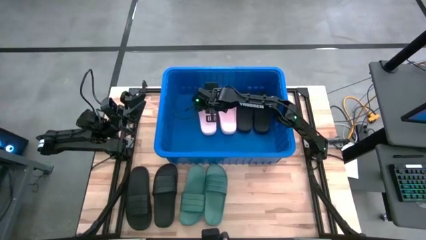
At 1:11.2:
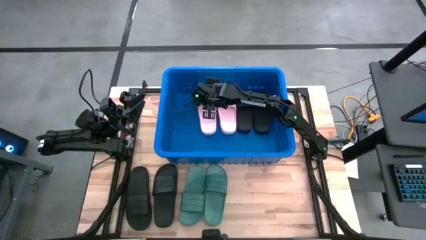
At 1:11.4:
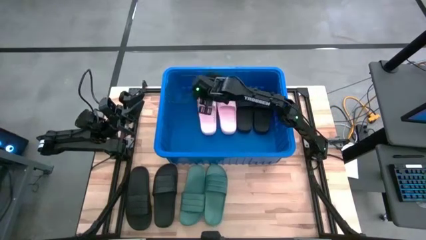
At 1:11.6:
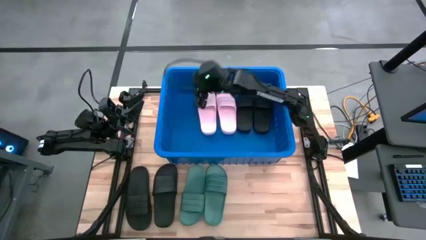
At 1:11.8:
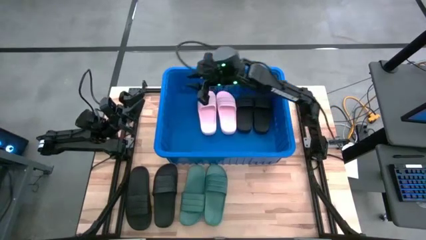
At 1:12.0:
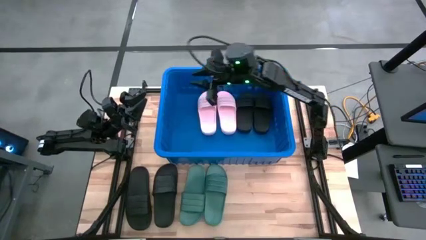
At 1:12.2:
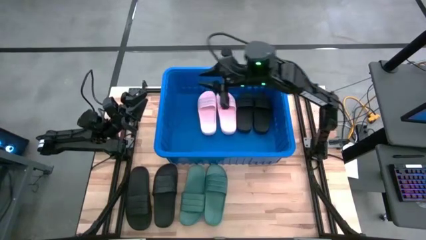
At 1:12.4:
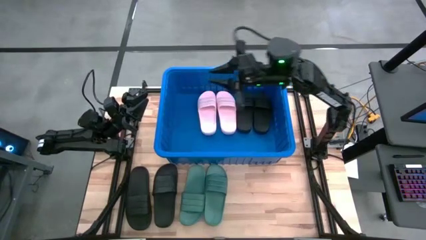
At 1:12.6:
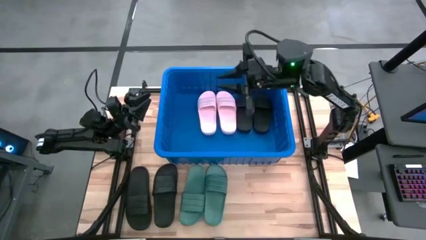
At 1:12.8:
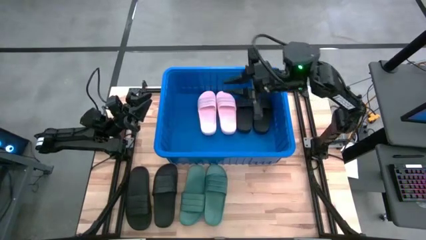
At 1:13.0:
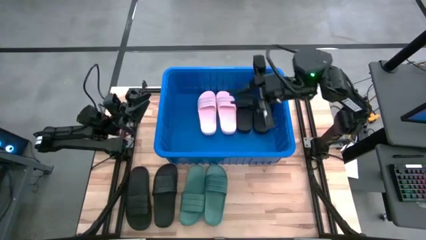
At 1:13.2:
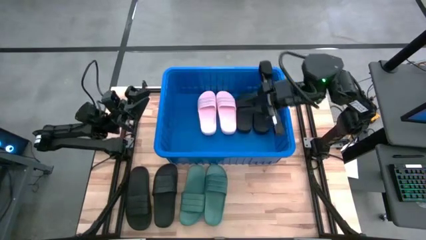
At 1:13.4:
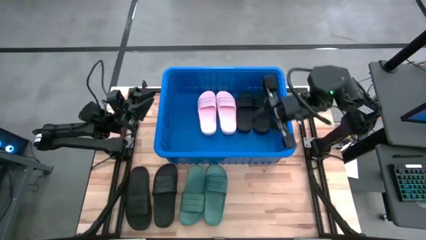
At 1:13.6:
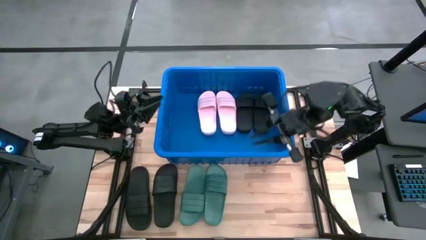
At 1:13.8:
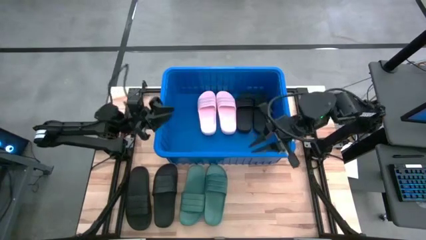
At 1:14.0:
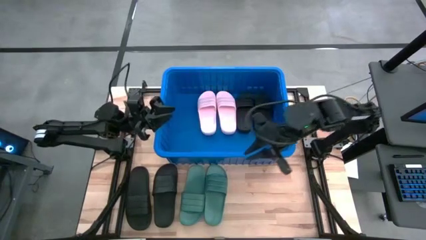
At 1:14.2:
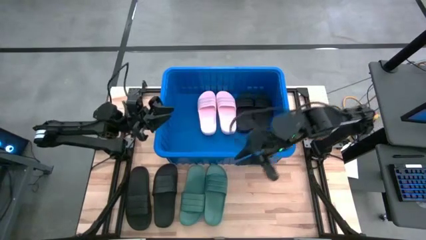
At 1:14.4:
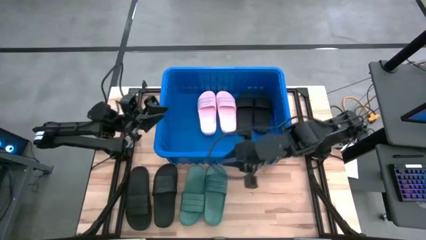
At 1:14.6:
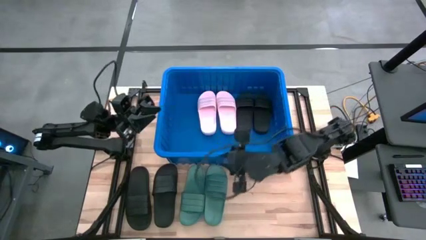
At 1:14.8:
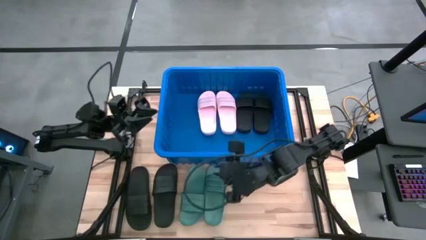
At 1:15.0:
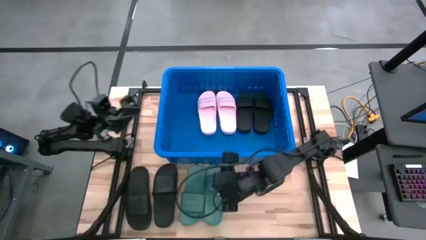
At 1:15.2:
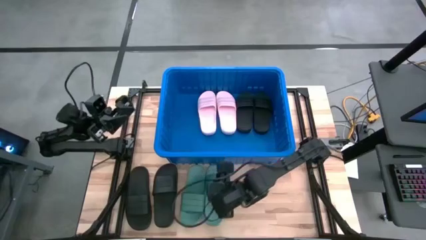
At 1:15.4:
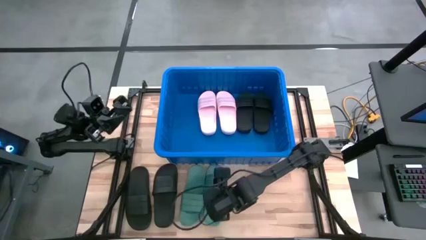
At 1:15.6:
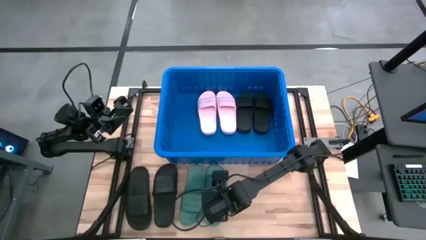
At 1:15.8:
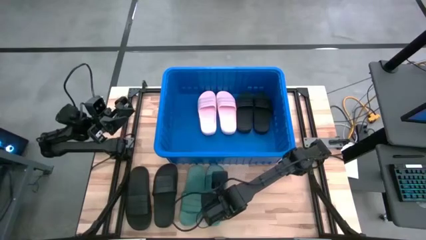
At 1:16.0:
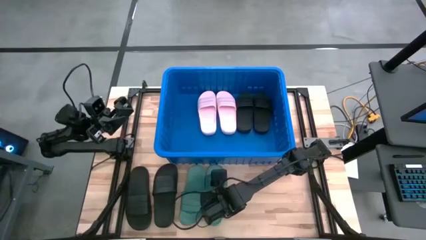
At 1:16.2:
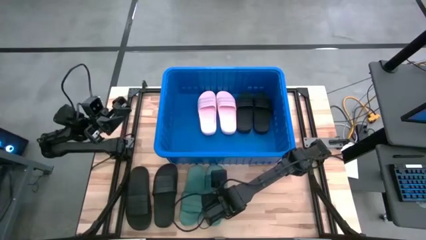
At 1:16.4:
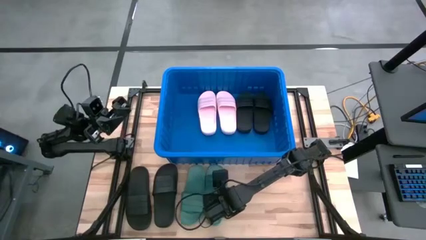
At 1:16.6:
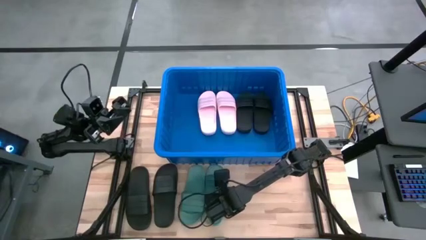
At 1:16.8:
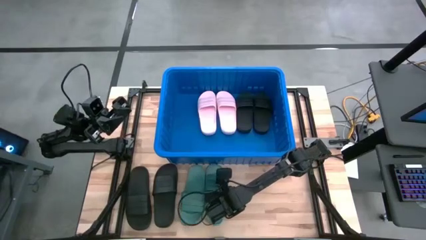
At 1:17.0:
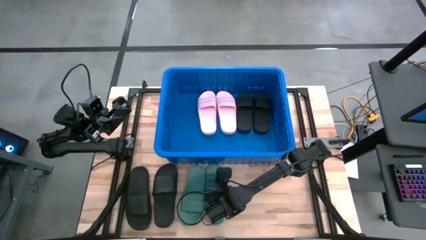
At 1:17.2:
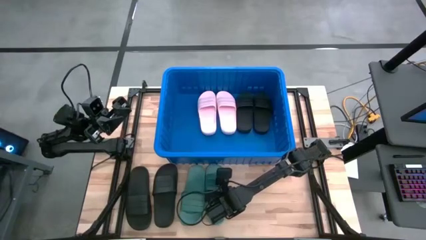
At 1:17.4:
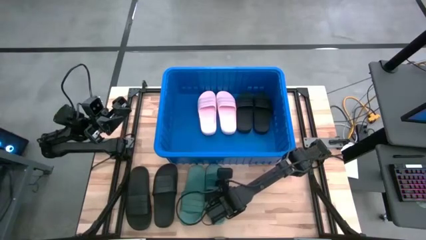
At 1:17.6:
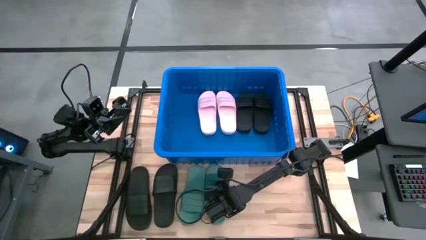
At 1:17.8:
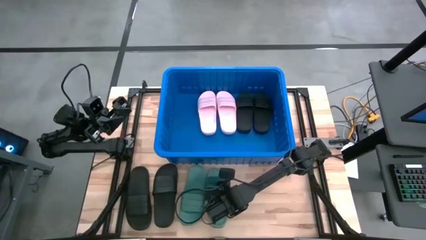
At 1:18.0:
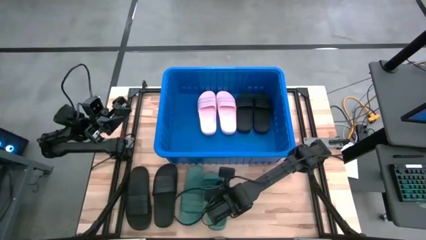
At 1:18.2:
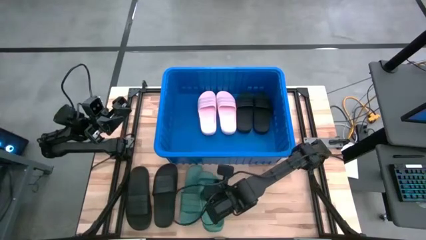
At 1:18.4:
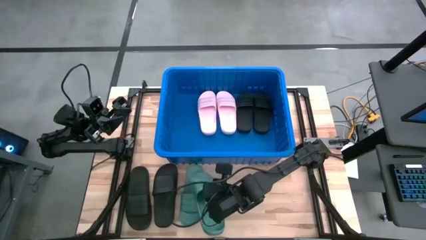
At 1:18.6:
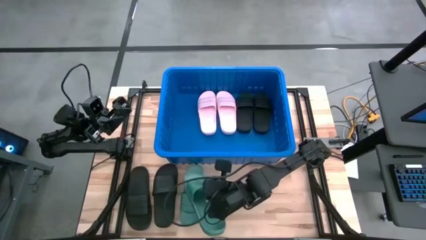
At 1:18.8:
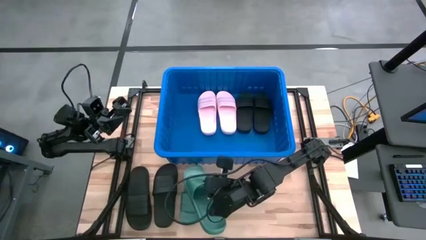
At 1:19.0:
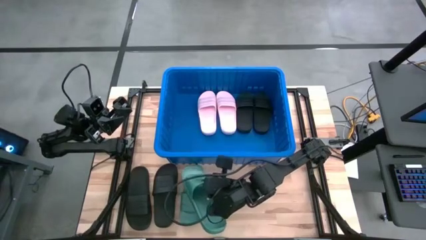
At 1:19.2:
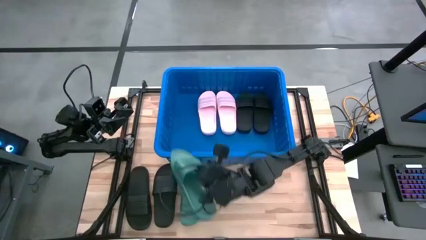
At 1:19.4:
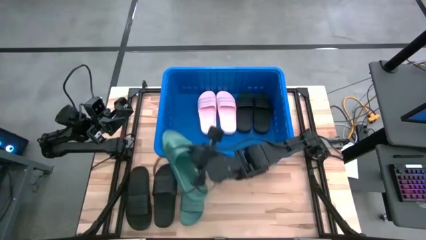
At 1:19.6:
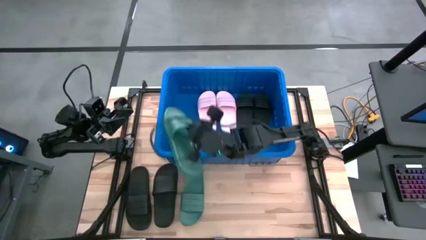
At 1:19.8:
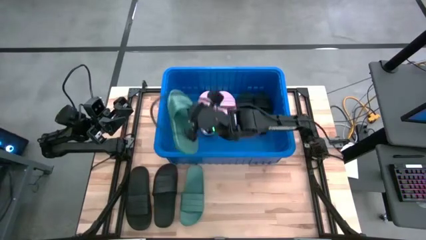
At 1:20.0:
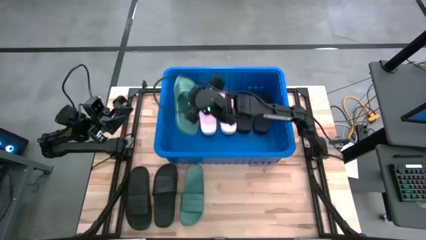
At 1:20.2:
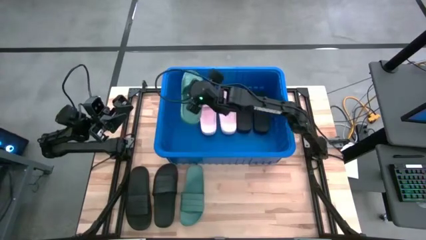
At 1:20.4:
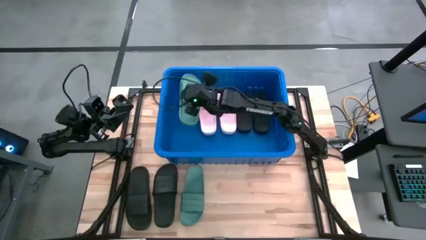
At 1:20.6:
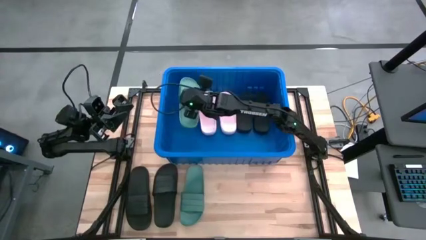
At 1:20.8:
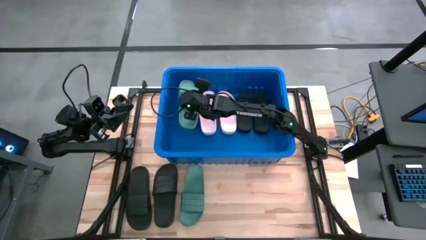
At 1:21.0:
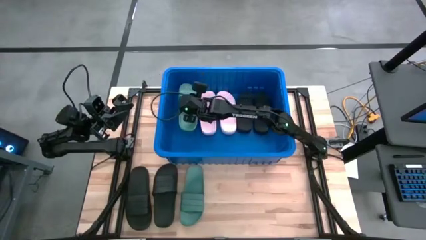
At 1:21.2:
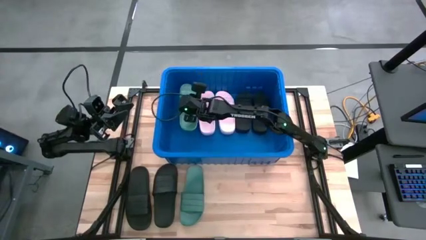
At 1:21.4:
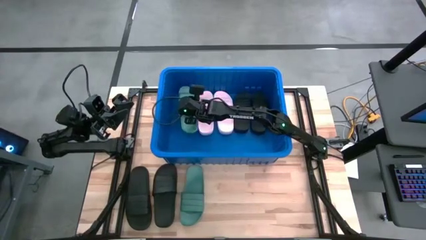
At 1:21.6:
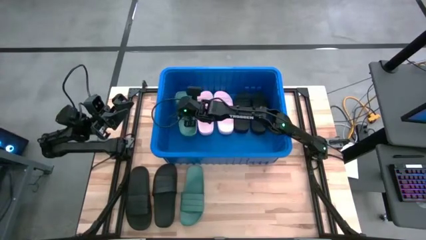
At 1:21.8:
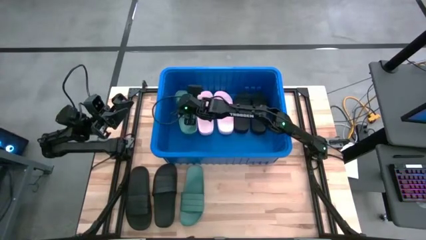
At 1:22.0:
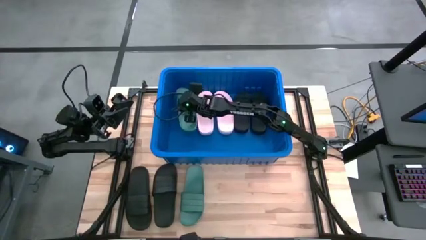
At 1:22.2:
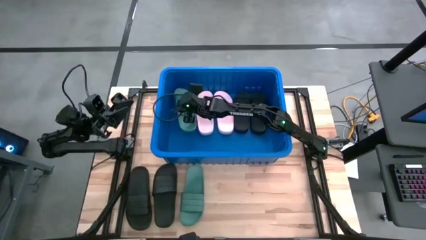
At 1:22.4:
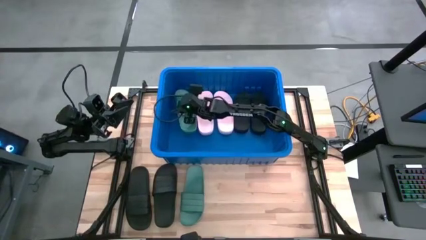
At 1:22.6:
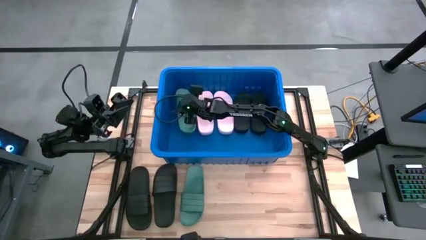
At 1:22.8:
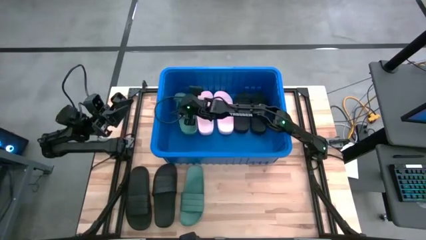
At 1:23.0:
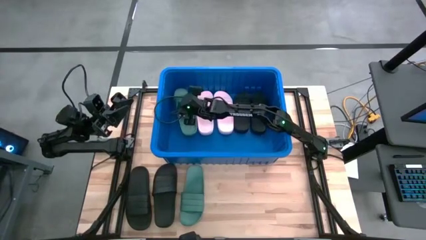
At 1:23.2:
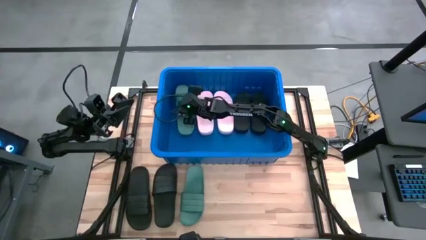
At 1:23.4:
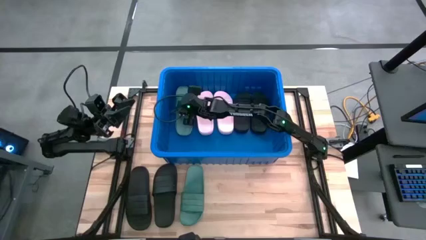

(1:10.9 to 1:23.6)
Task: Pick and place slides into bin
Put the right green slipper into the blue bin
